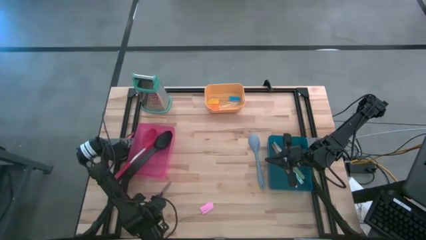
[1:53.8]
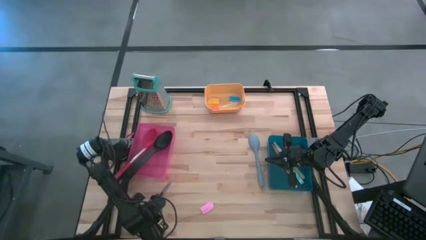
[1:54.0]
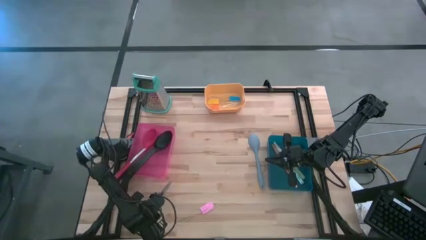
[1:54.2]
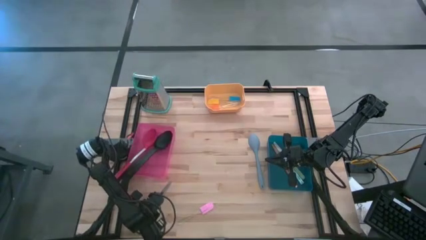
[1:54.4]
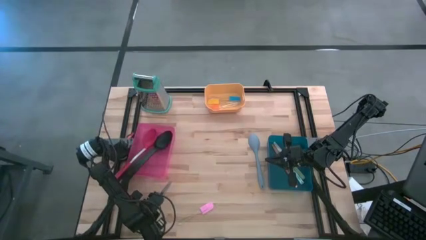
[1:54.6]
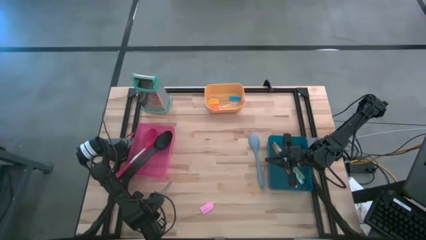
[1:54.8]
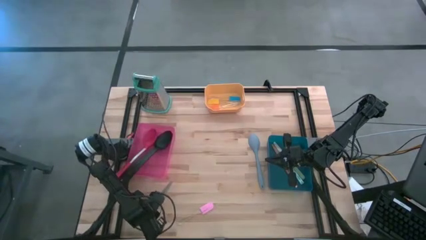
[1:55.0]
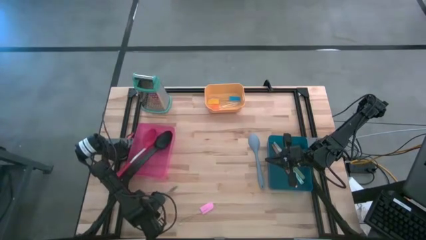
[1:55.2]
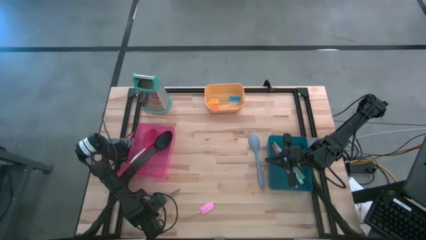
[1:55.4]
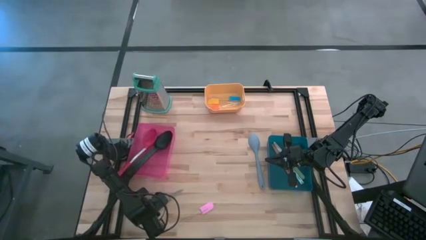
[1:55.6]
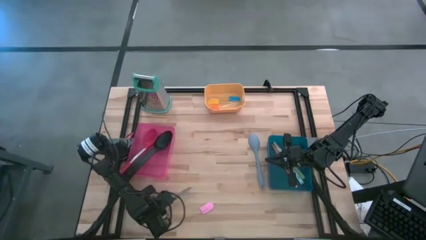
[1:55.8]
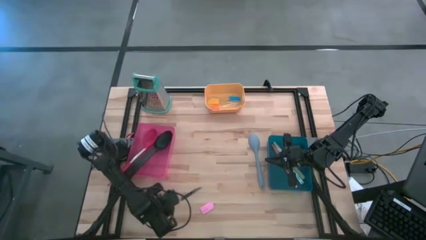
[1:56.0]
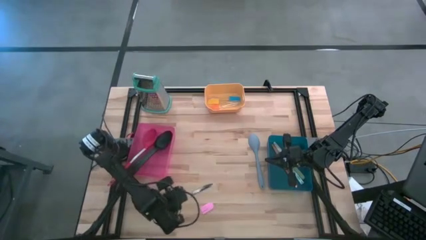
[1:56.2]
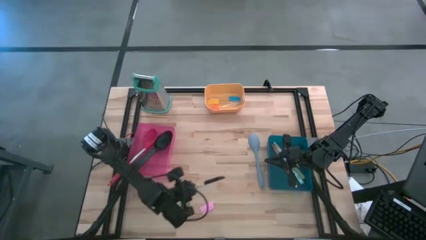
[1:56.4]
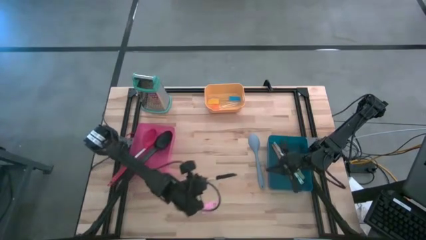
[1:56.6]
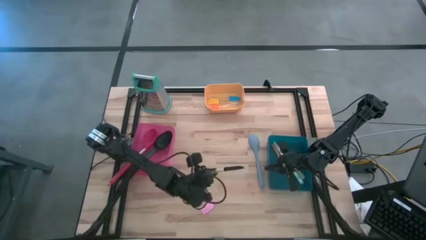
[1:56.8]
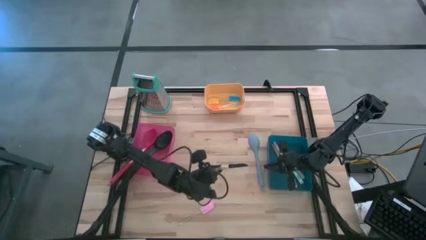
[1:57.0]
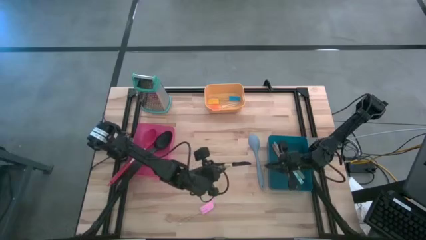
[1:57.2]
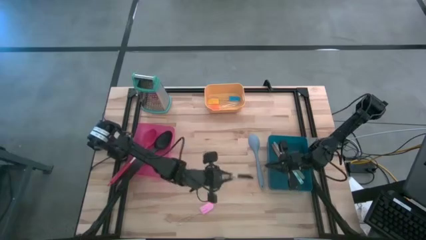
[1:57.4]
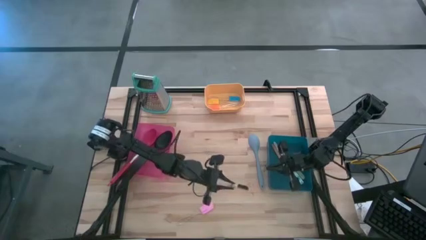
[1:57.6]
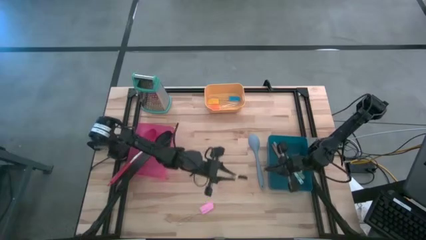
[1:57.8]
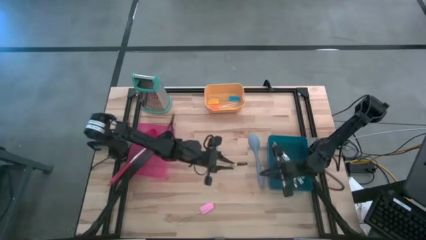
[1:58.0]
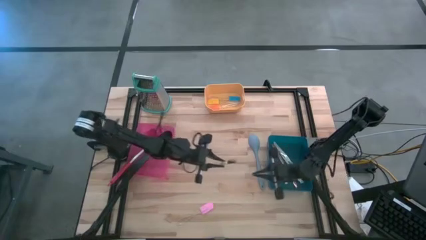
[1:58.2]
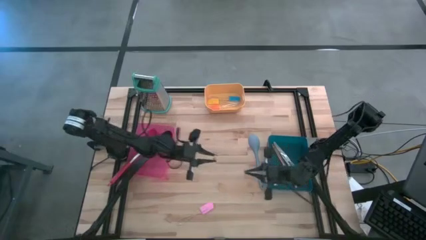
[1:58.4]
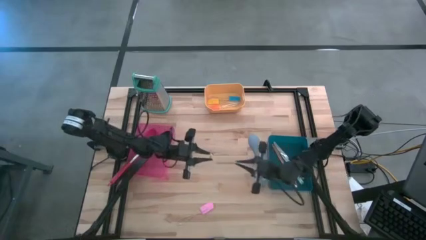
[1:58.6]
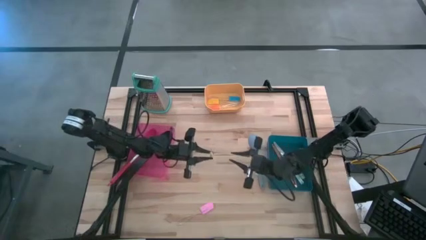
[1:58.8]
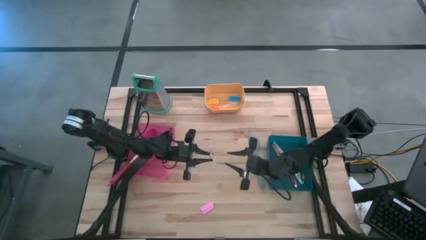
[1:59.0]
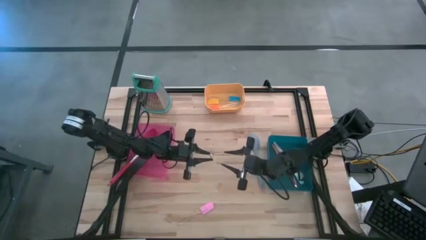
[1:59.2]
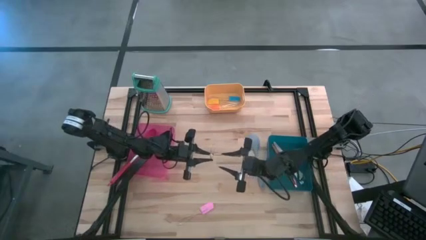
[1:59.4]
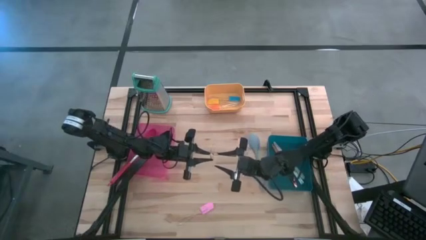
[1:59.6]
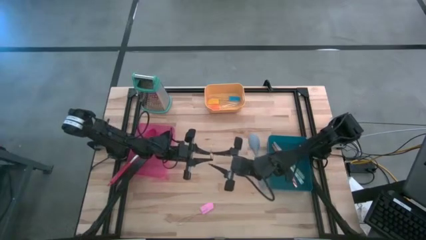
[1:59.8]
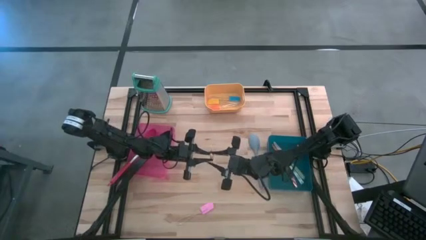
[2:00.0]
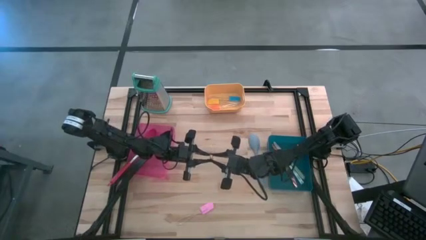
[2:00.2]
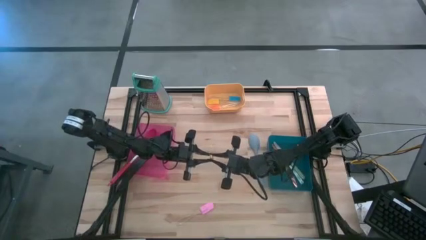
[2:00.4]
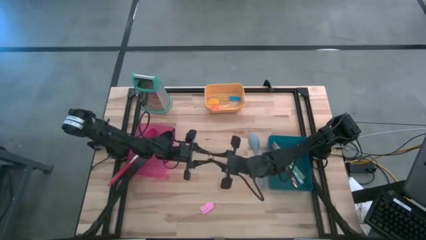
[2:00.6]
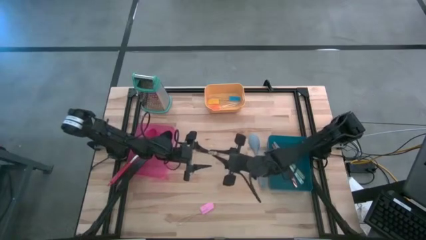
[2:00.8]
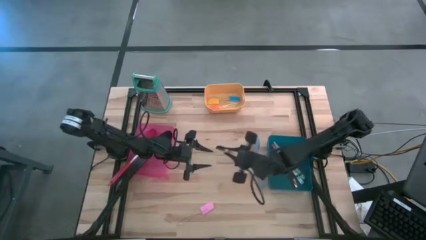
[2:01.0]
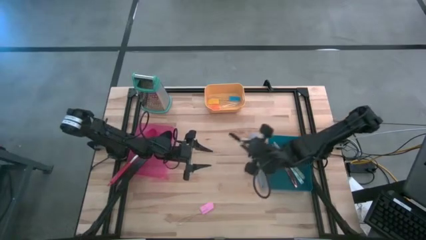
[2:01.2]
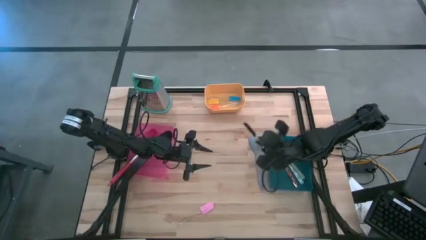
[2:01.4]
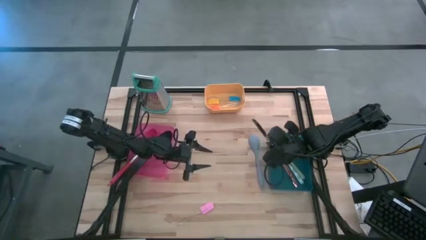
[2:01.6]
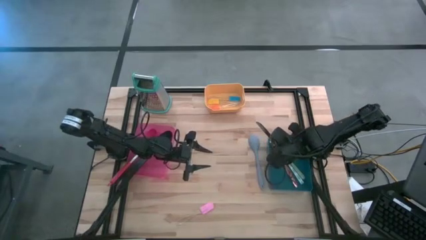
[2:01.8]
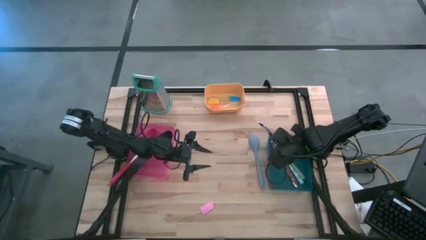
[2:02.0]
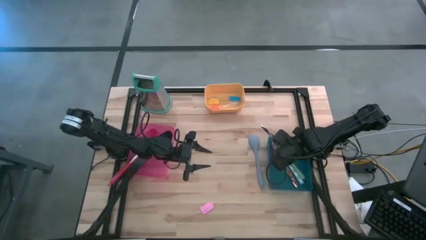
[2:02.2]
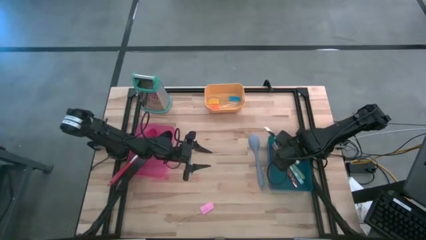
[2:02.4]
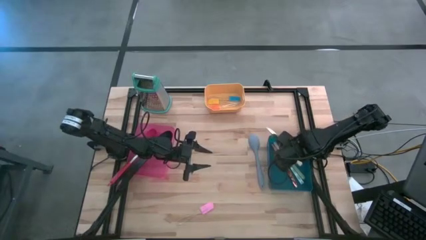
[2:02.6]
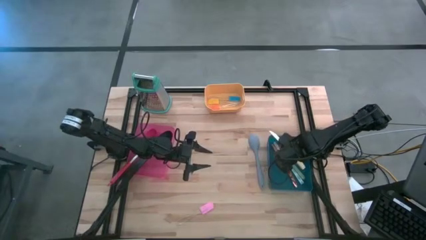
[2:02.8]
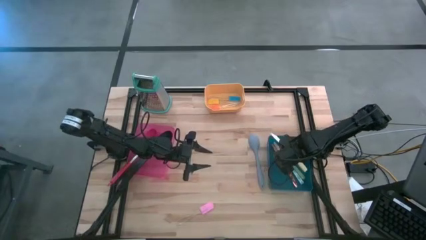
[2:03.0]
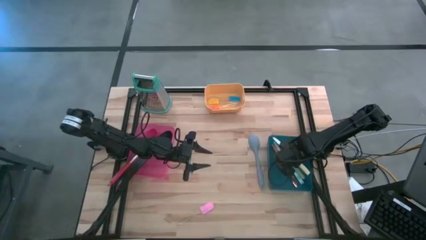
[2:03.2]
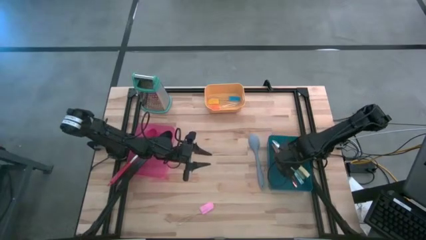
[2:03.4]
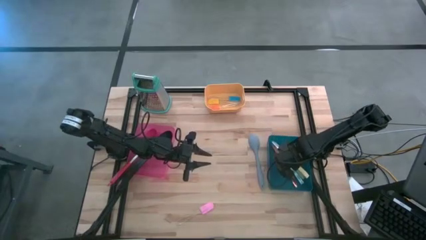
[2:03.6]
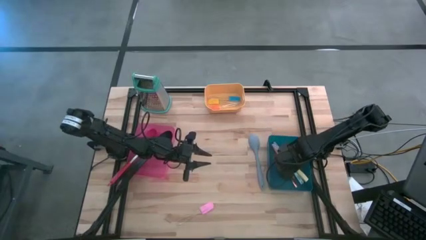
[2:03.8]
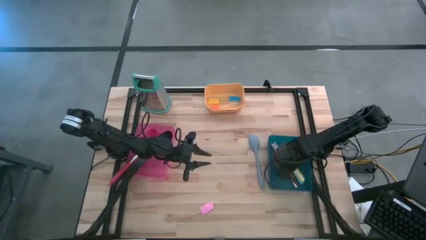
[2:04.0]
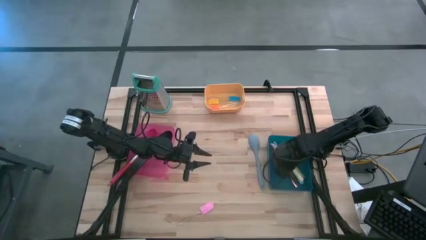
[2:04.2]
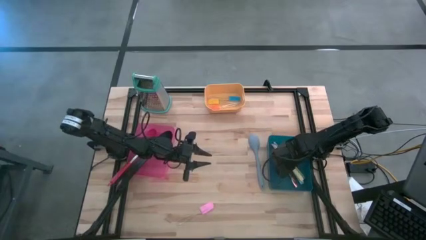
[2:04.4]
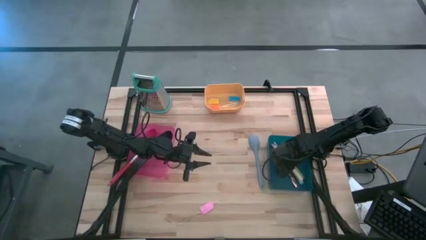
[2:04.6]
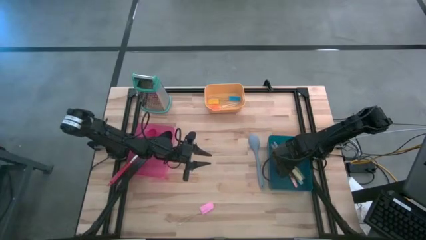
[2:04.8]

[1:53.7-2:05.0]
Task: Pick & Place Kitchen Items
Put the yellow knife into the blue bin

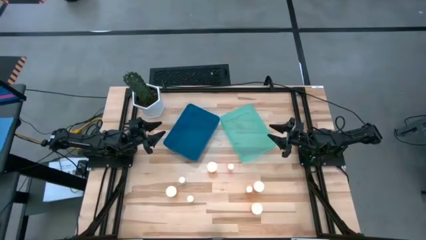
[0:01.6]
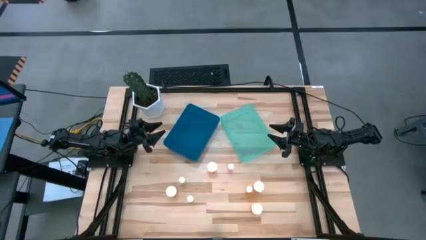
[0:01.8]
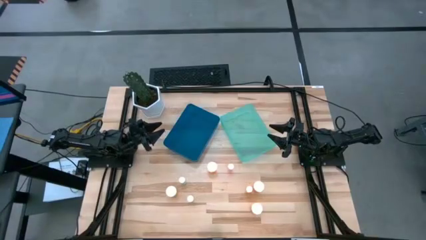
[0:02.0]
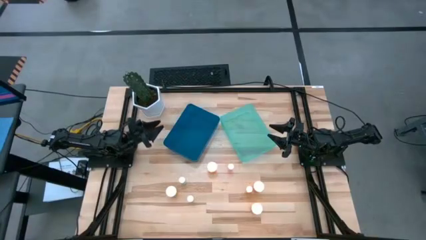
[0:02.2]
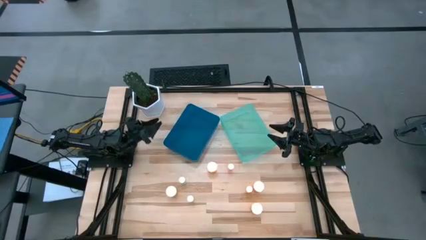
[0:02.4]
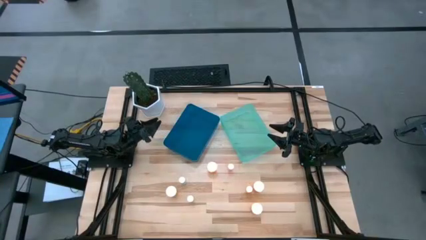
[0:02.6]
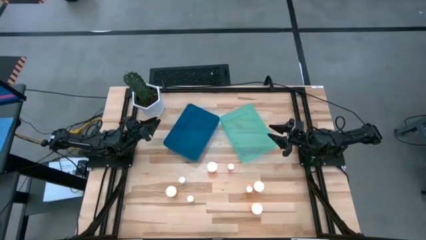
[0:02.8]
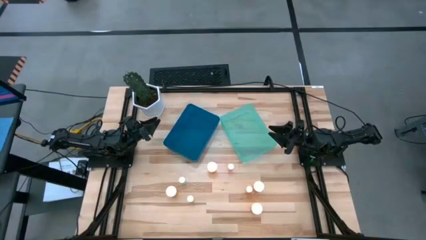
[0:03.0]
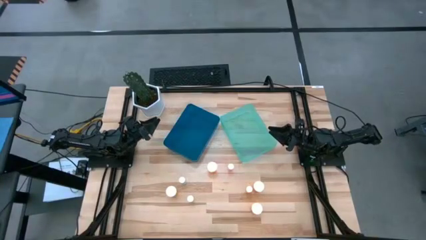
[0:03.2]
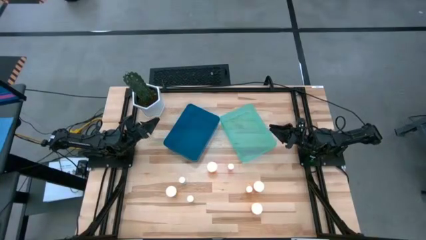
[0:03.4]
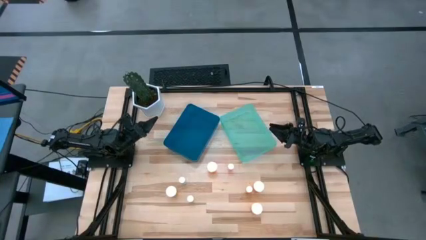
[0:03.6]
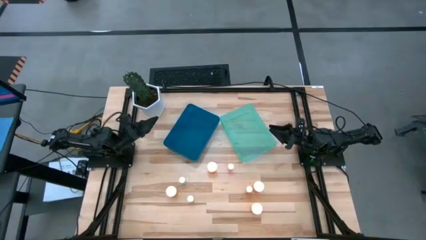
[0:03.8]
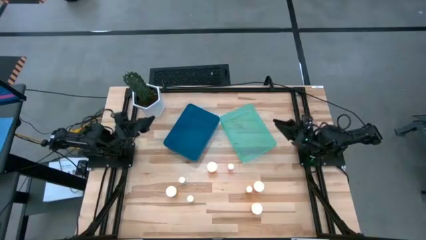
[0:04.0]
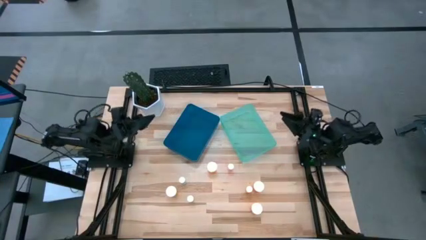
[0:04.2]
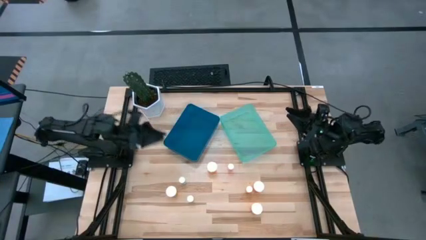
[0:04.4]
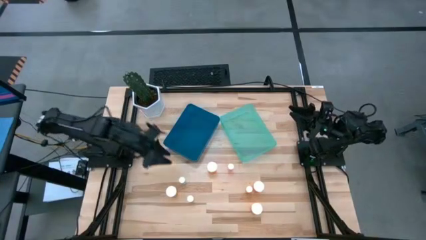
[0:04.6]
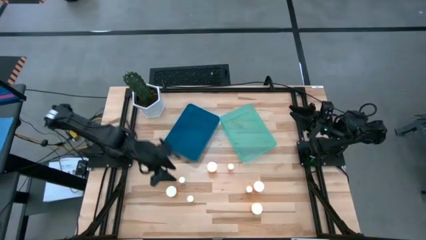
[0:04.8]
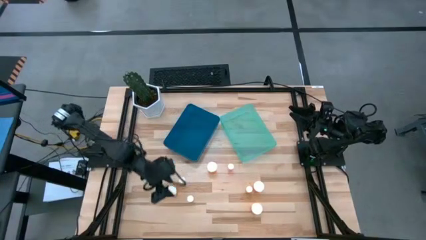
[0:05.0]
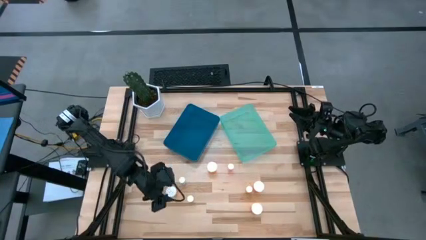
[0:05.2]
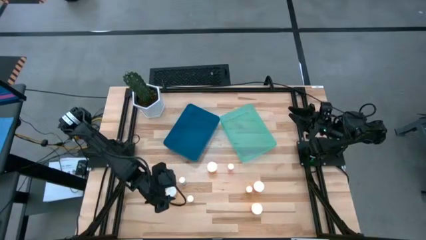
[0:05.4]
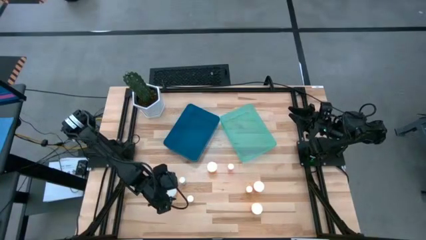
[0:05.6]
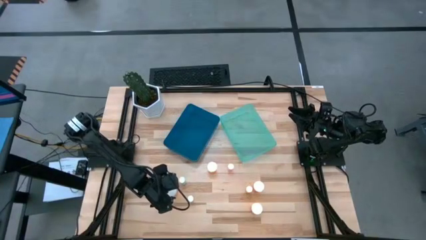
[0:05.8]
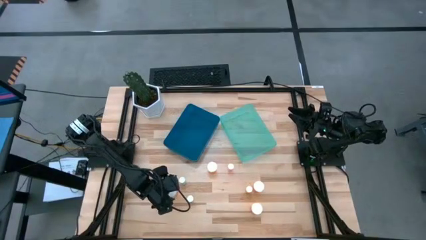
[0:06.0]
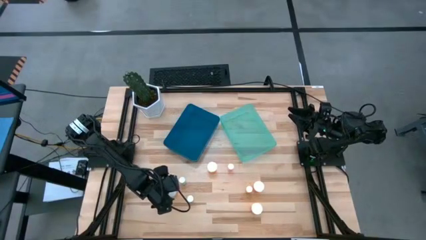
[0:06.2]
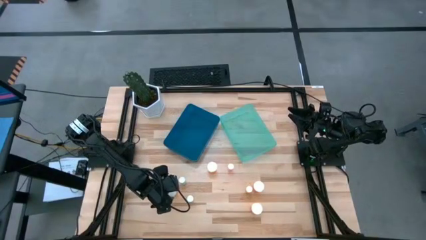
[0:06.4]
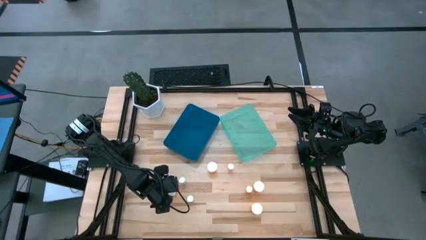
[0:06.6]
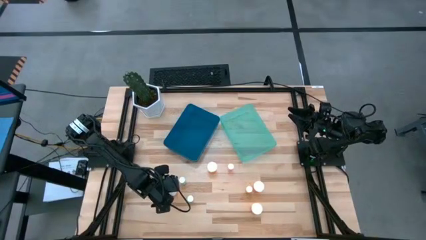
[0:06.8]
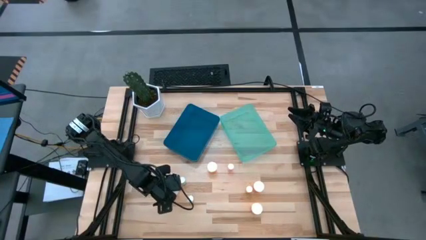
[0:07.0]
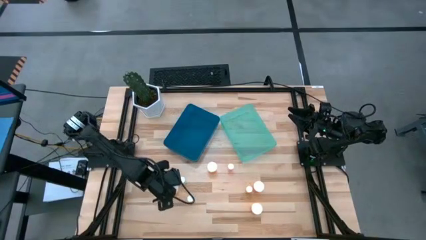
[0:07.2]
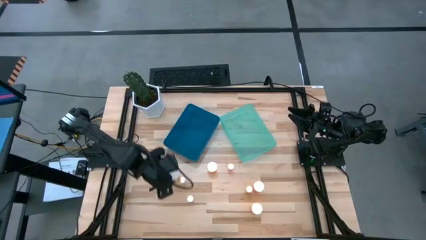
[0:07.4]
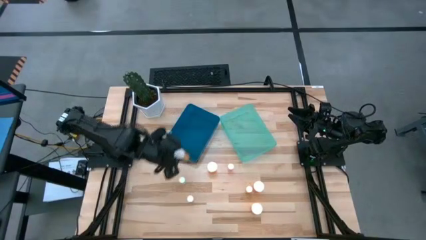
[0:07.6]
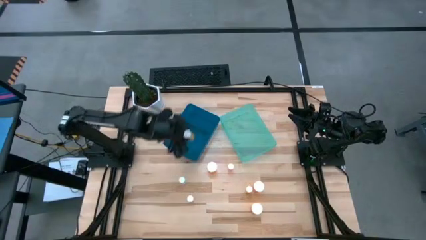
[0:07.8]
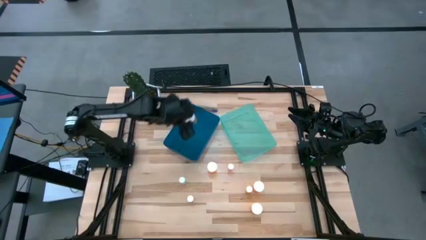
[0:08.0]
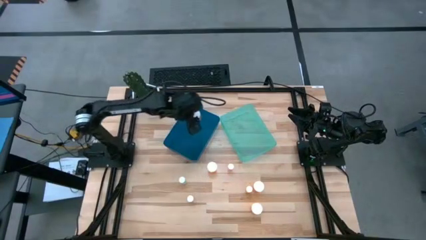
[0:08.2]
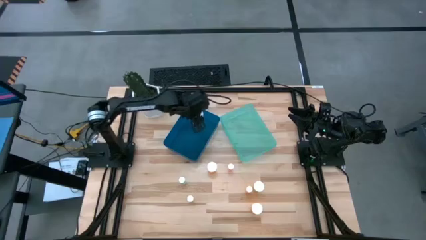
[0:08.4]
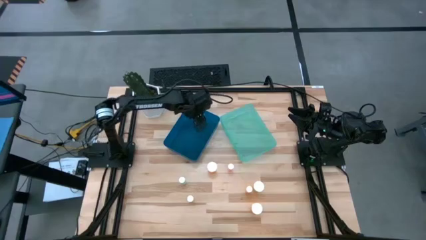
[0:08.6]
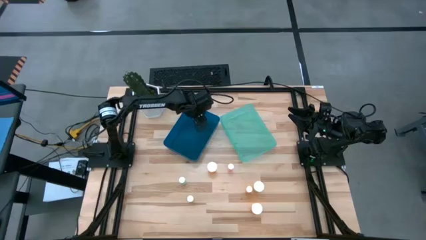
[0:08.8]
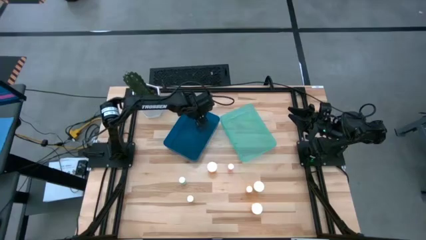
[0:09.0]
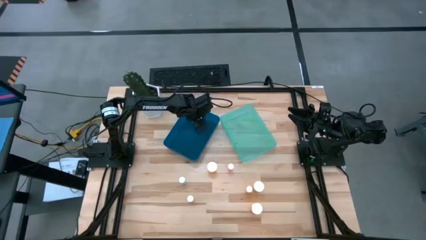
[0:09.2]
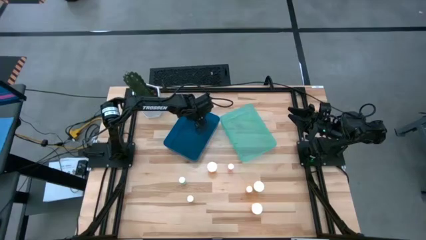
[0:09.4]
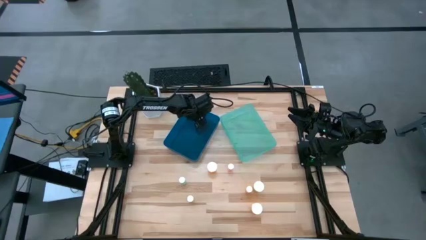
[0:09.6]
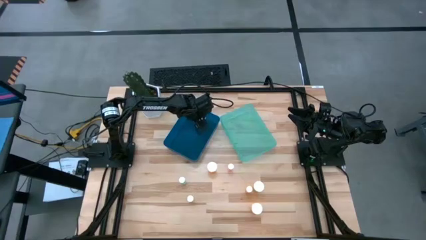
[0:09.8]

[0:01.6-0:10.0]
Task: Pick and place medicine bottles into bin by pill shape (circle, oval)
Put the orange pill bottle into the blue bin
